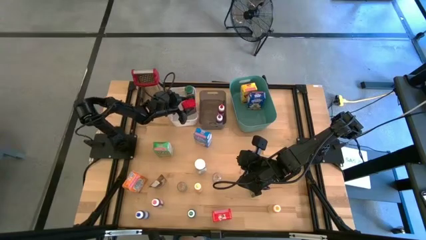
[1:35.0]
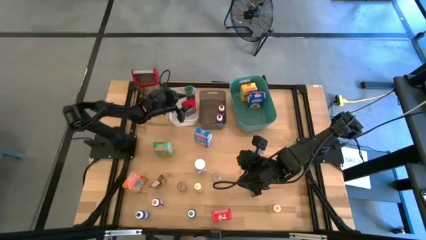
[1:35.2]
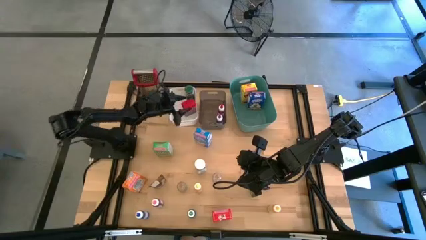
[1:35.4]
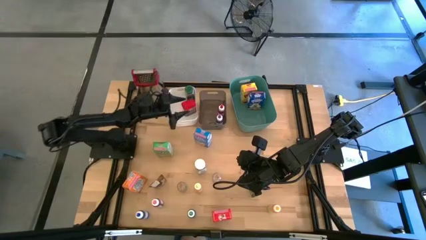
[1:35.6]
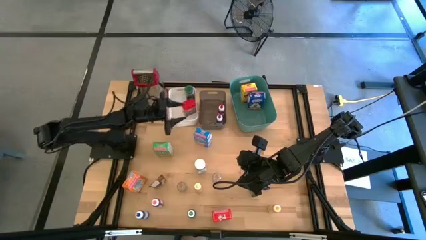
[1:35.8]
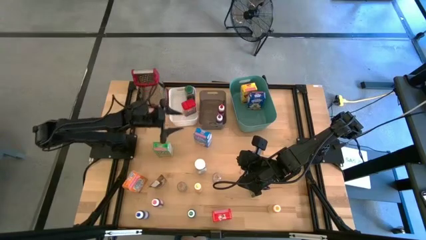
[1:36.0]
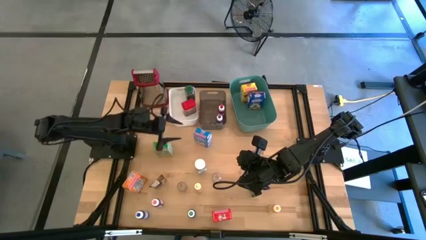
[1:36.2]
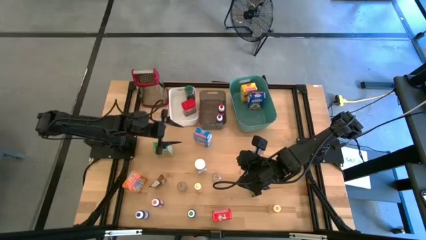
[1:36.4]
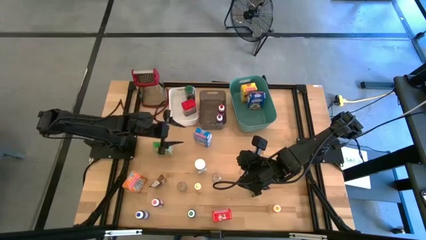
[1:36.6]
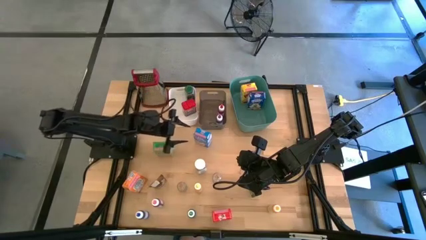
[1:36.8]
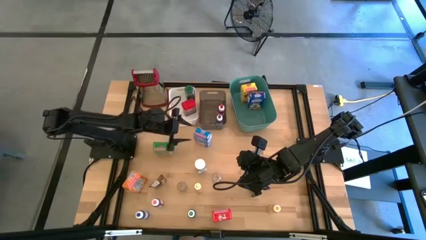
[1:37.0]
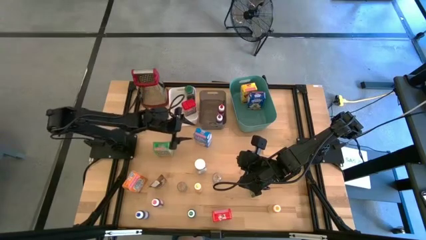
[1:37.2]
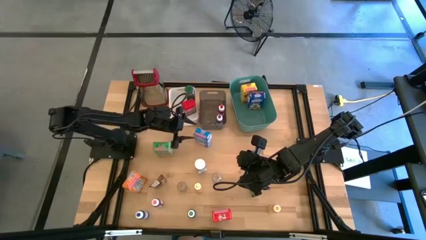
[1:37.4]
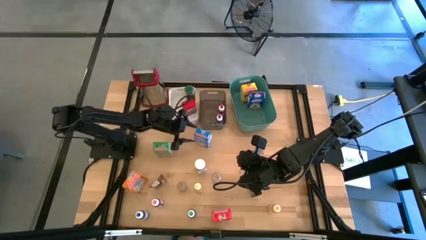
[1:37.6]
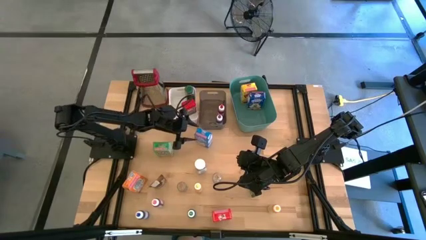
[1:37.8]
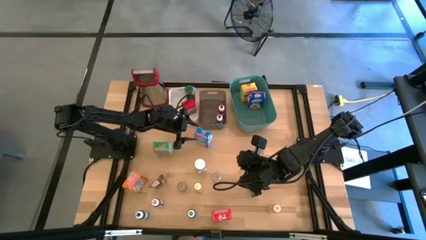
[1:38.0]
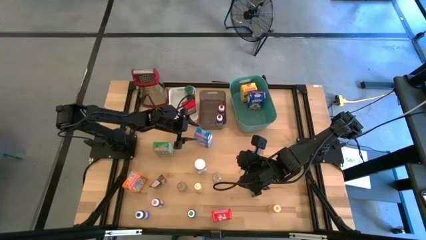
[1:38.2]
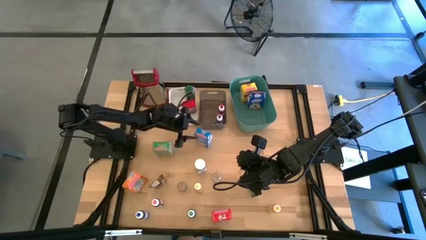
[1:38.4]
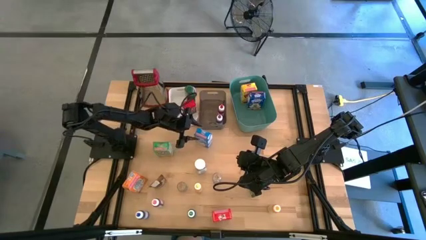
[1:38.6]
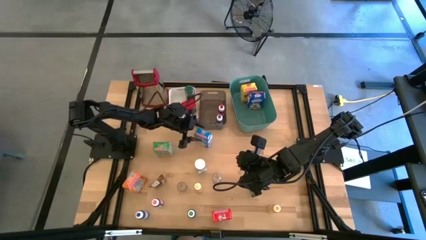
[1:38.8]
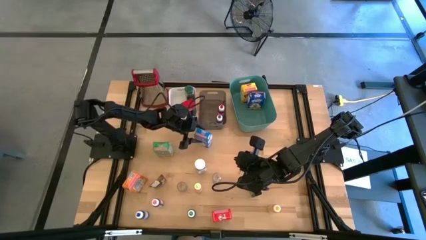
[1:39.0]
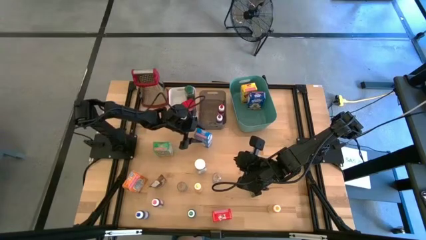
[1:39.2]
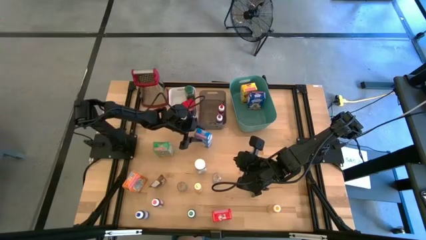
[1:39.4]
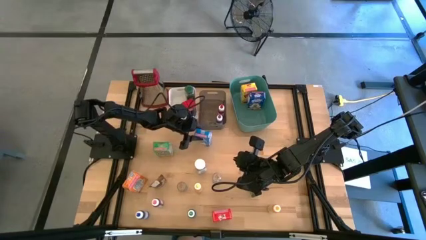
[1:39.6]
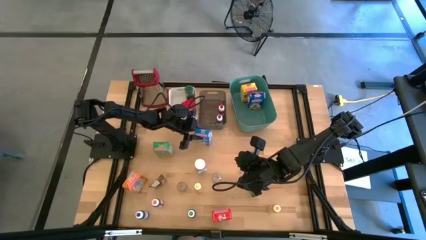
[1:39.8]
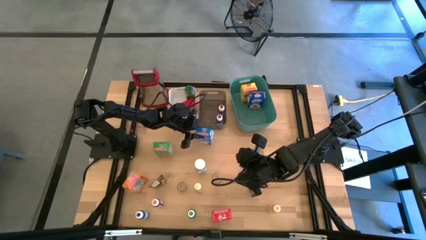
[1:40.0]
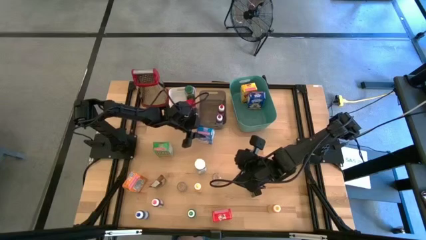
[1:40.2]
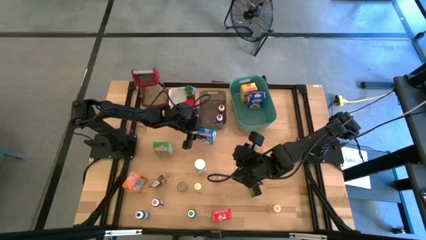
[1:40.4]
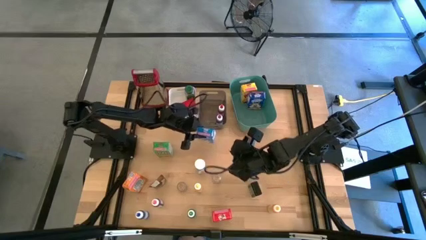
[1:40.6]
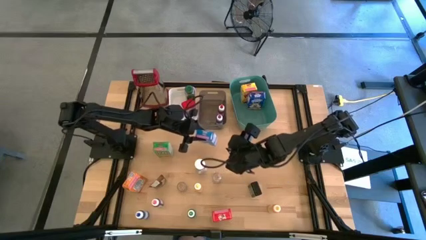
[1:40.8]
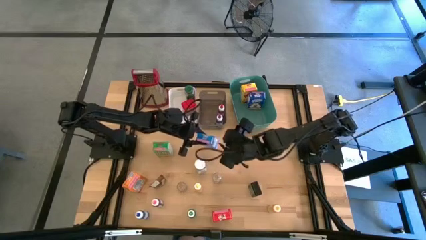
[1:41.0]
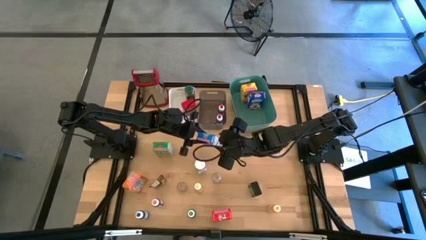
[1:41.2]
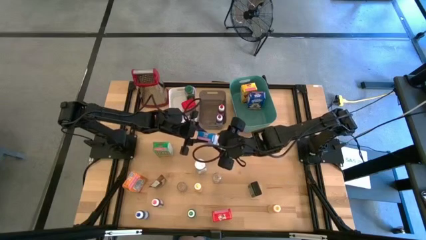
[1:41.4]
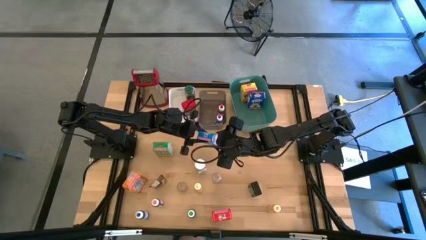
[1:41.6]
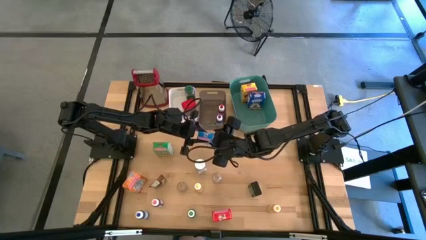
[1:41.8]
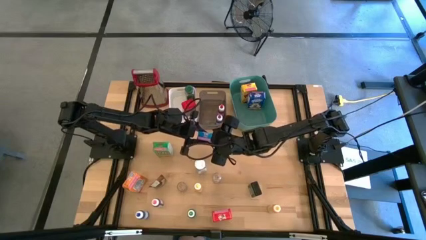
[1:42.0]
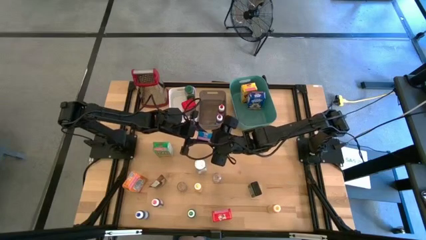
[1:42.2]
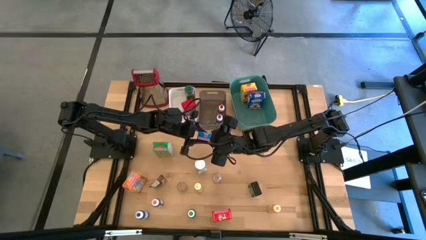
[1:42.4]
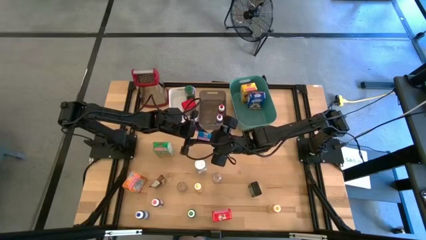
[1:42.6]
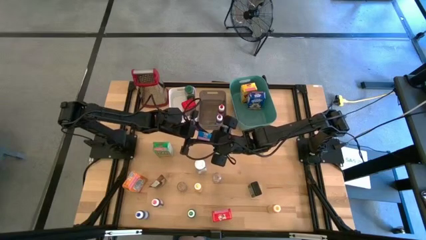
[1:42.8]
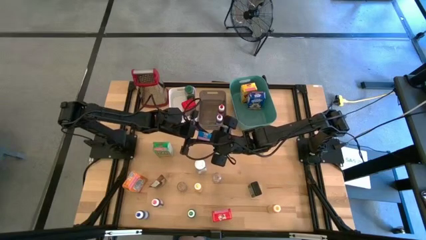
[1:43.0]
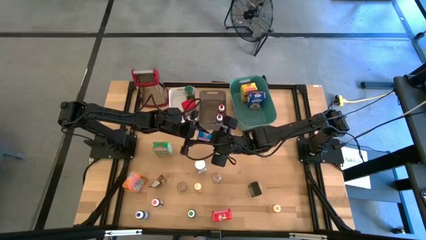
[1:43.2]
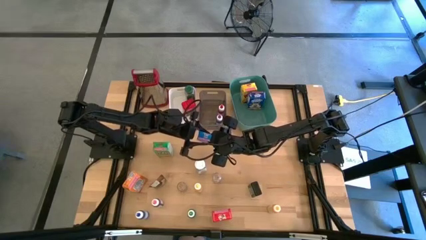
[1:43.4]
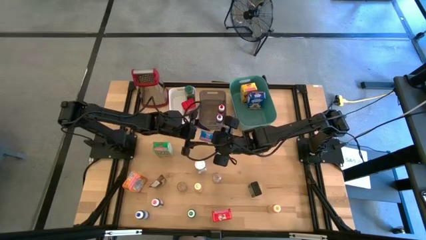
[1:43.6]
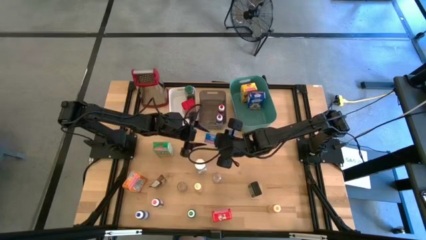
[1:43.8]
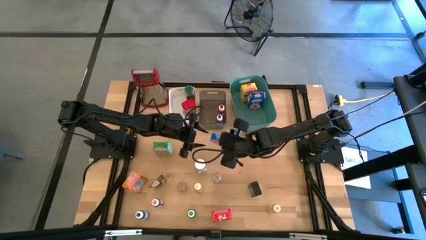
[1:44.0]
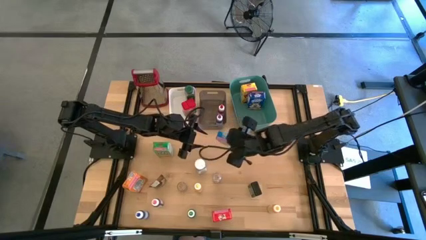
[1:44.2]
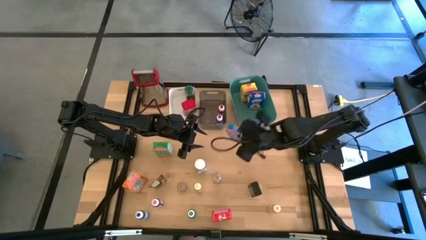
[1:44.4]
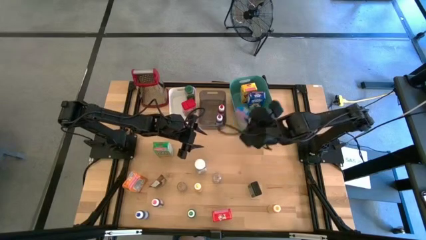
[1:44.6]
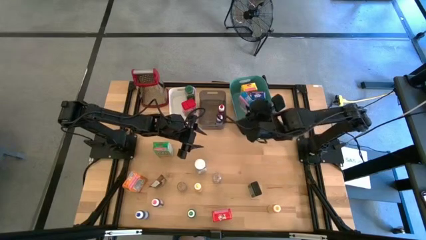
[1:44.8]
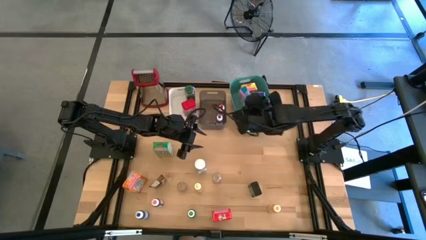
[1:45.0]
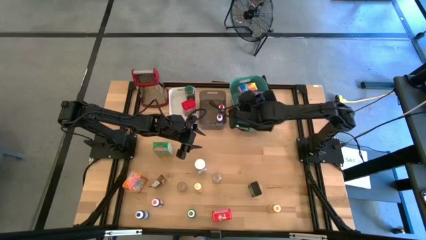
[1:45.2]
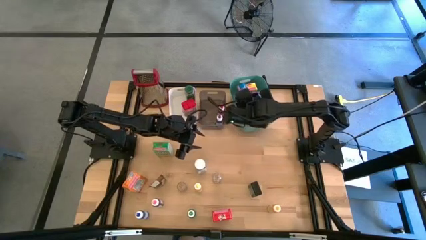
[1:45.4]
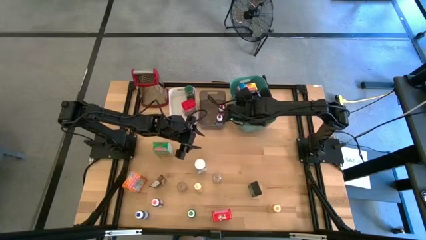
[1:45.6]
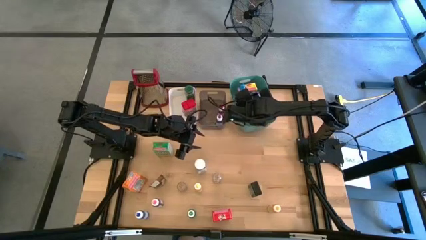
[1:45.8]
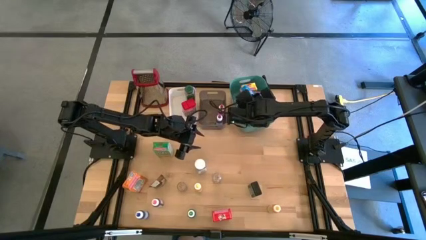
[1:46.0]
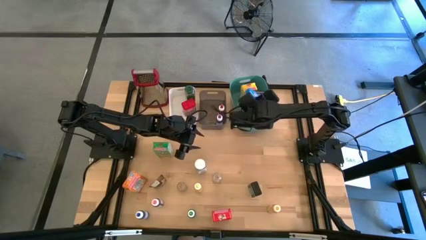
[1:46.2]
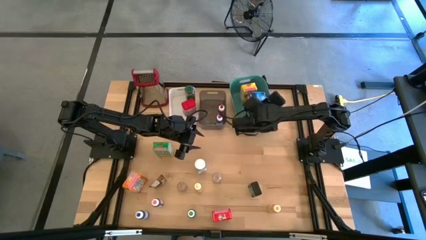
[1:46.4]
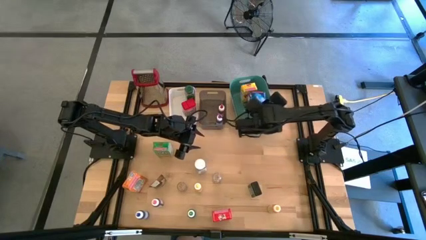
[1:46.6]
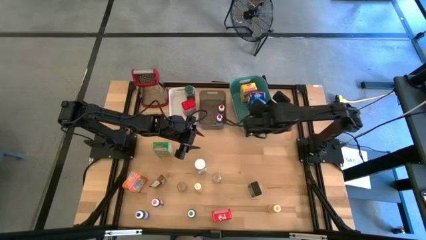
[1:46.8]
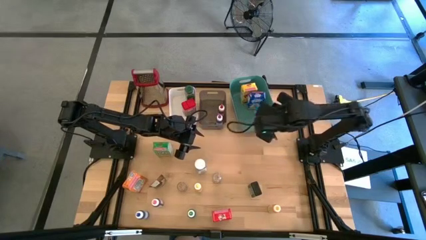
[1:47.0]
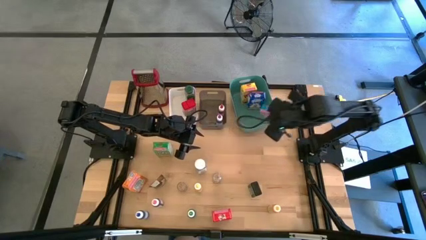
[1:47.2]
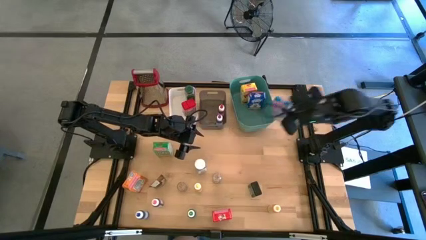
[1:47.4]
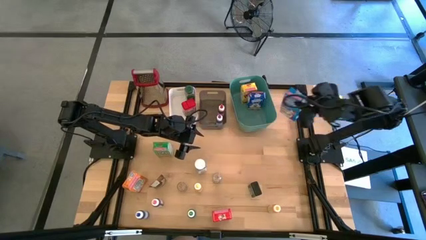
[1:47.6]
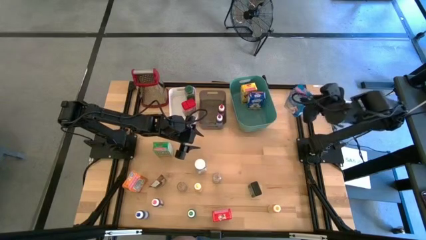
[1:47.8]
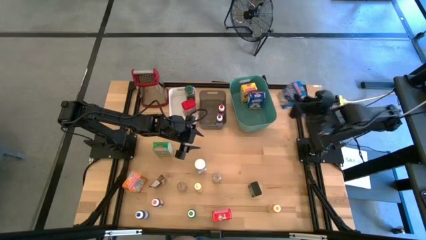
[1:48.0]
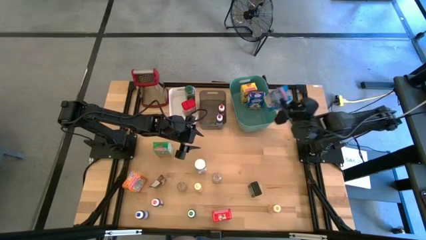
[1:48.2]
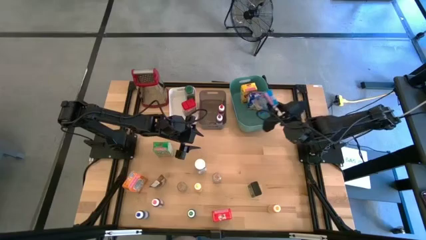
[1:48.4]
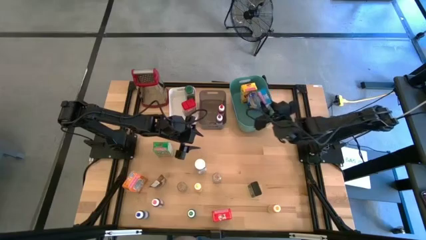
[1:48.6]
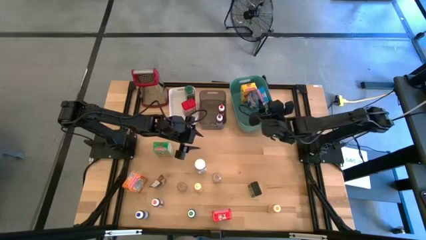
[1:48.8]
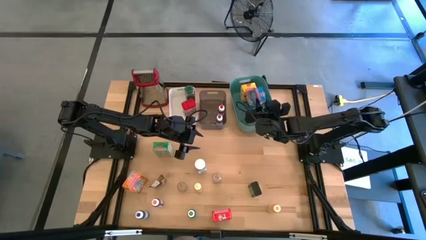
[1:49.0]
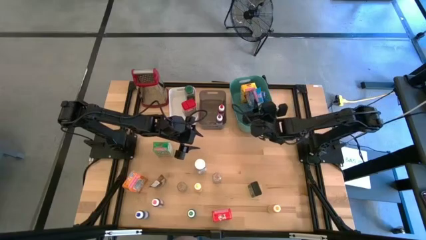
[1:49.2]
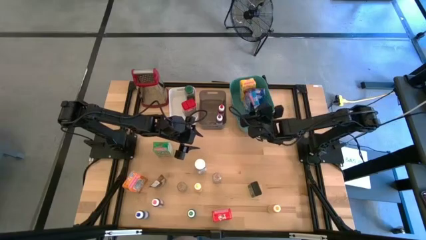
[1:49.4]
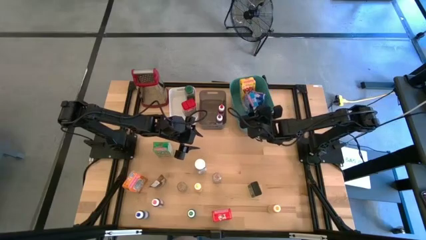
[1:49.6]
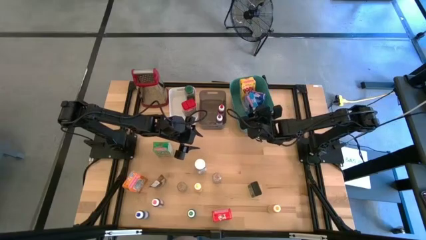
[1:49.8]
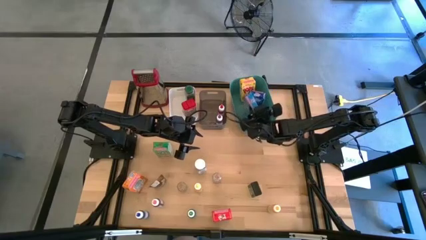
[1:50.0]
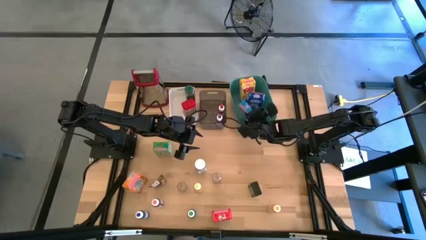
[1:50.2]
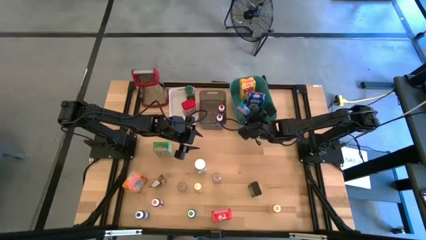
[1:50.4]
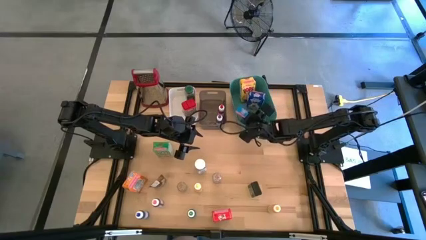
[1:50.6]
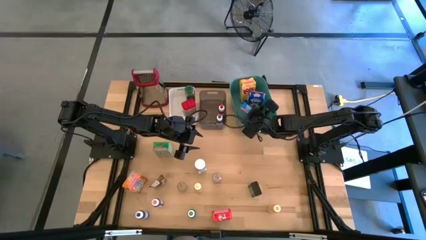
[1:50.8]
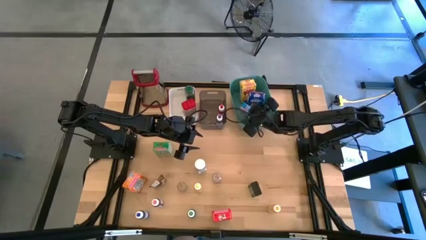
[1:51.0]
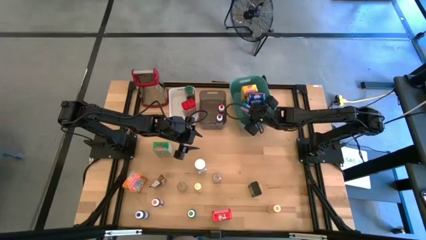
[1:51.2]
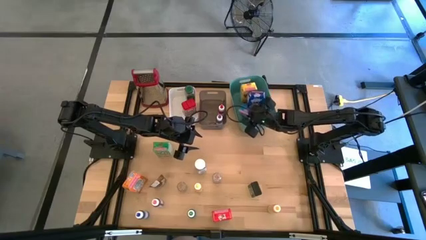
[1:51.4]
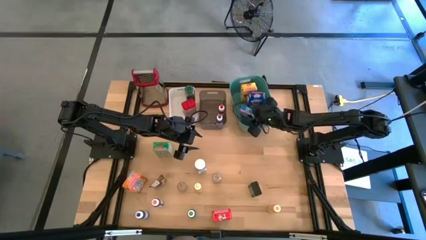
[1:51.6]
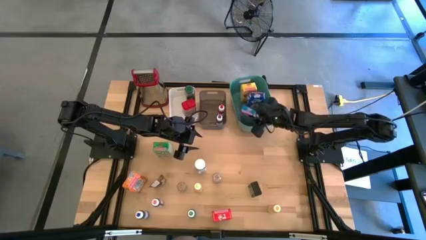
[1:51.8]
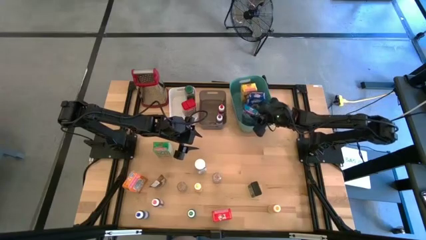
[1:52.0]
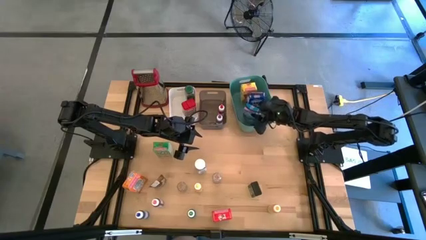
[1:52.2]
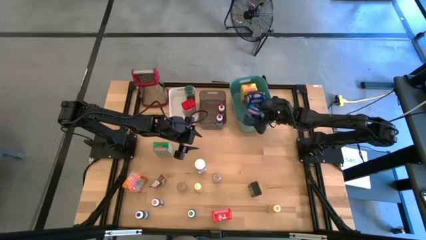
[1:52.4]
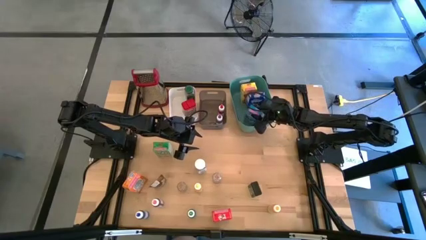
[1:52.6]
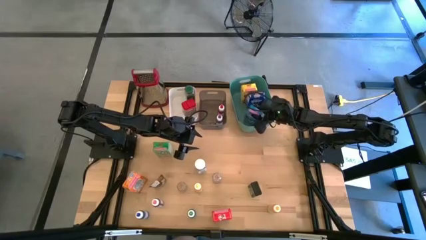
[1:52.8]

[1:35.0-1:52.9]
Task: Pick & Place Kitchen Items
Put the blue cereal box into the right green bin
